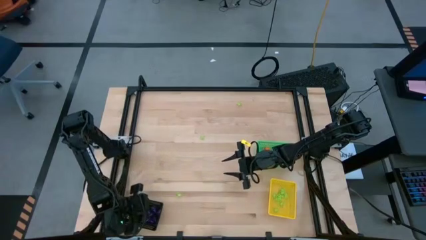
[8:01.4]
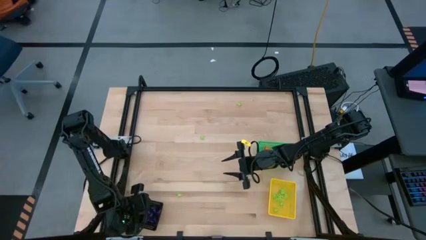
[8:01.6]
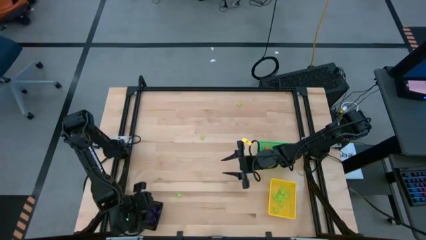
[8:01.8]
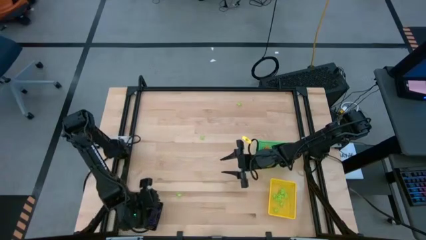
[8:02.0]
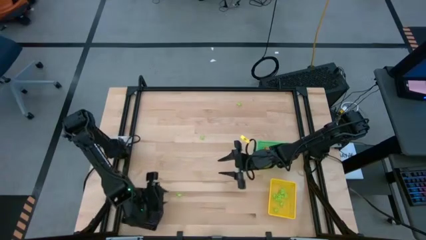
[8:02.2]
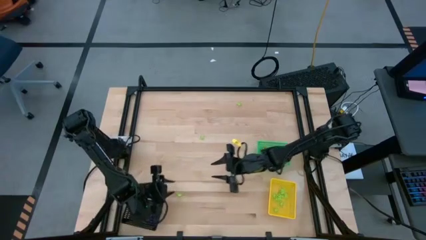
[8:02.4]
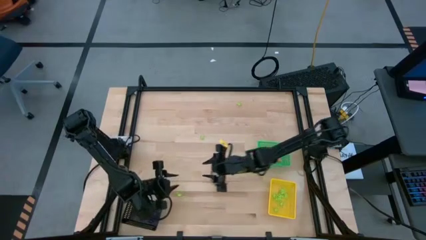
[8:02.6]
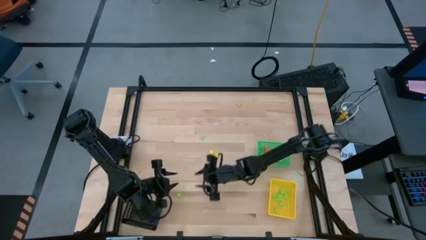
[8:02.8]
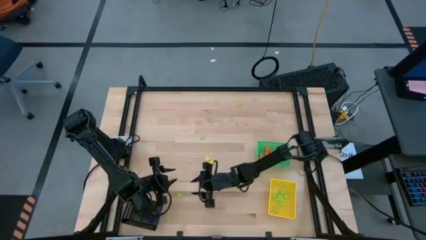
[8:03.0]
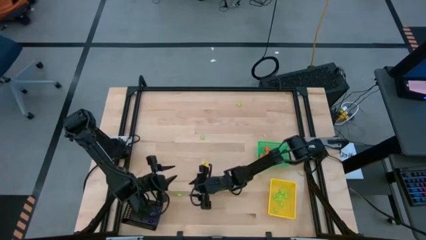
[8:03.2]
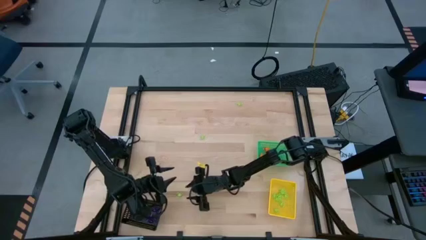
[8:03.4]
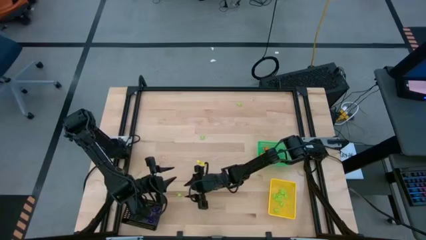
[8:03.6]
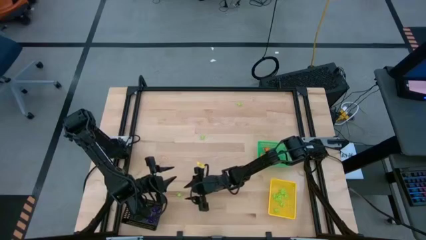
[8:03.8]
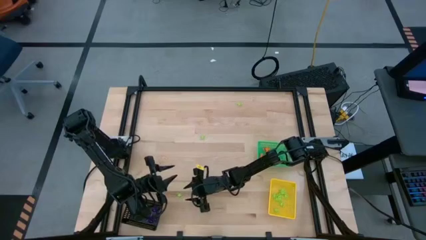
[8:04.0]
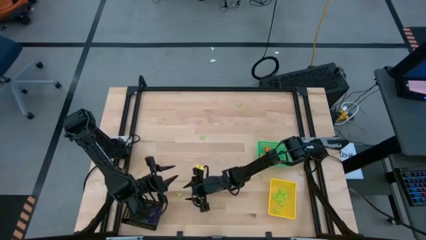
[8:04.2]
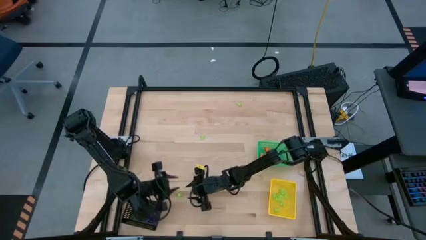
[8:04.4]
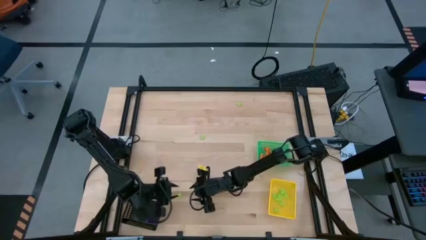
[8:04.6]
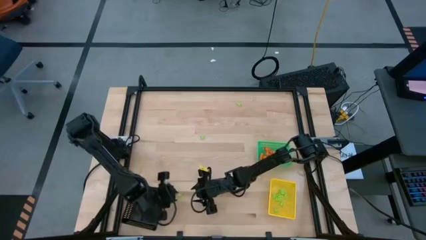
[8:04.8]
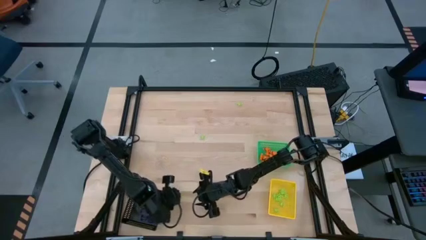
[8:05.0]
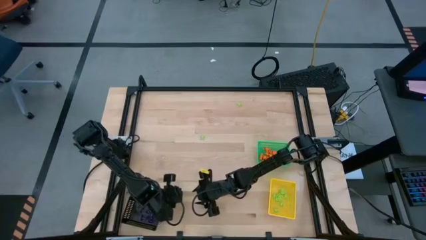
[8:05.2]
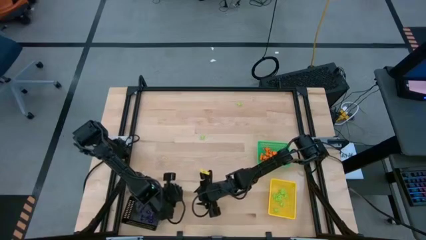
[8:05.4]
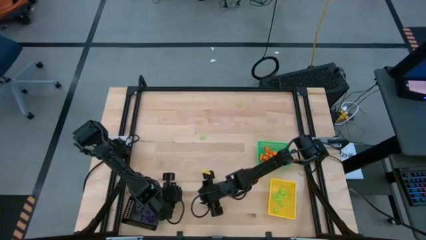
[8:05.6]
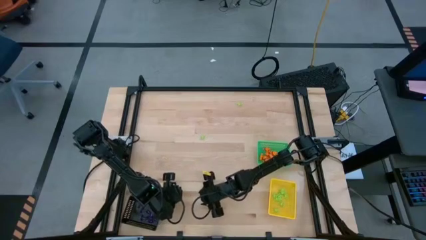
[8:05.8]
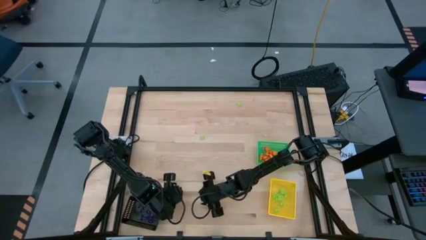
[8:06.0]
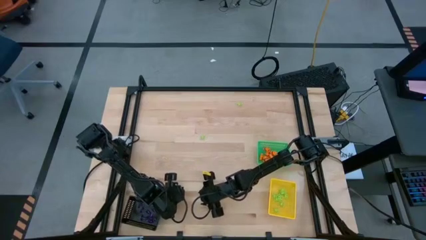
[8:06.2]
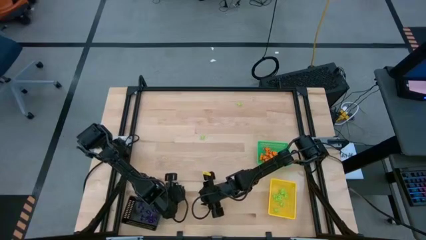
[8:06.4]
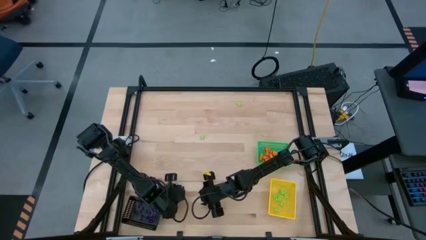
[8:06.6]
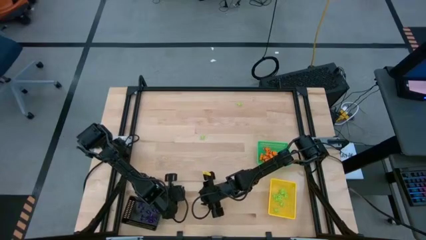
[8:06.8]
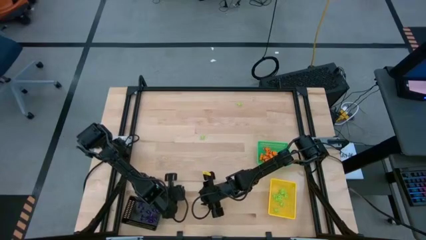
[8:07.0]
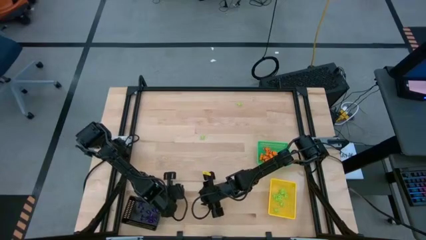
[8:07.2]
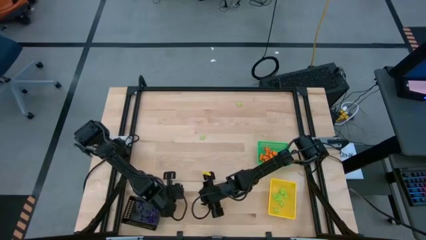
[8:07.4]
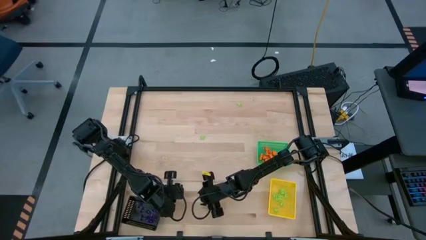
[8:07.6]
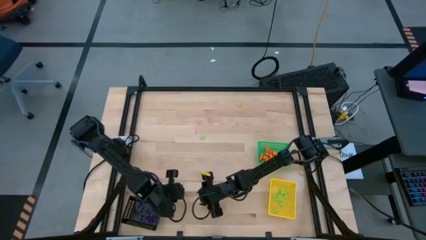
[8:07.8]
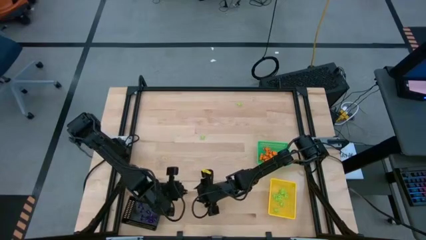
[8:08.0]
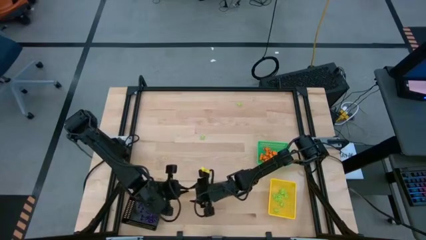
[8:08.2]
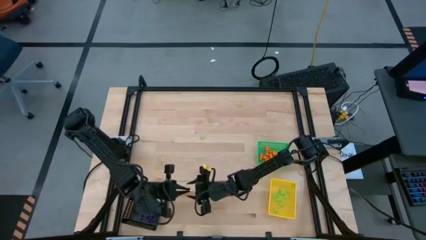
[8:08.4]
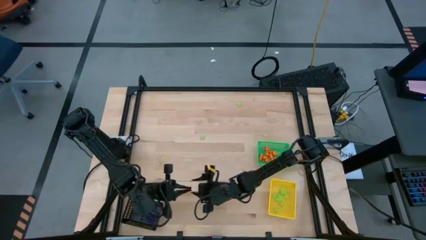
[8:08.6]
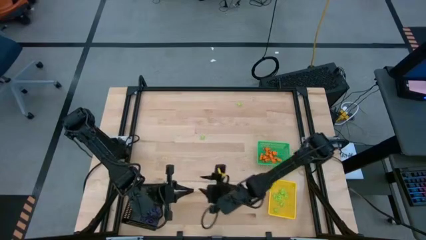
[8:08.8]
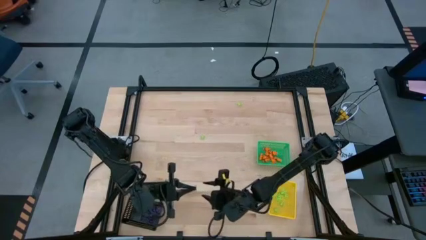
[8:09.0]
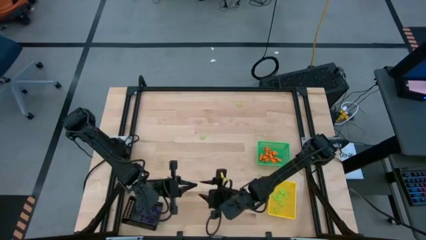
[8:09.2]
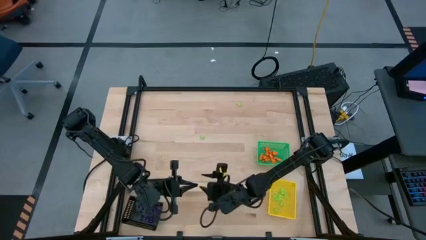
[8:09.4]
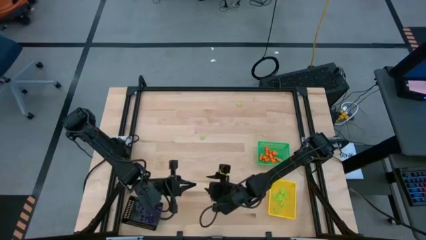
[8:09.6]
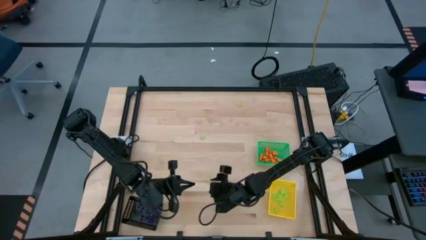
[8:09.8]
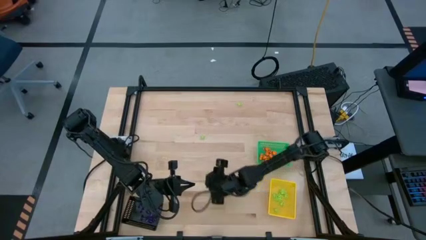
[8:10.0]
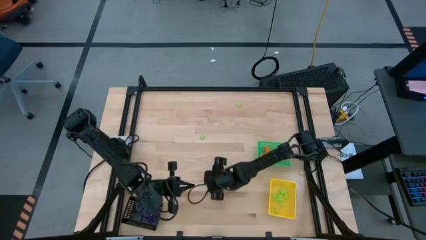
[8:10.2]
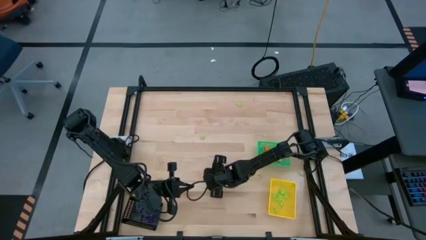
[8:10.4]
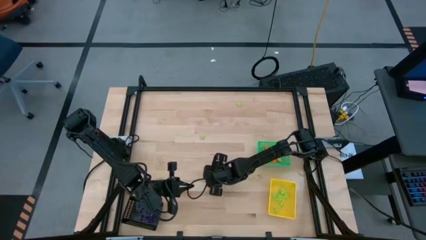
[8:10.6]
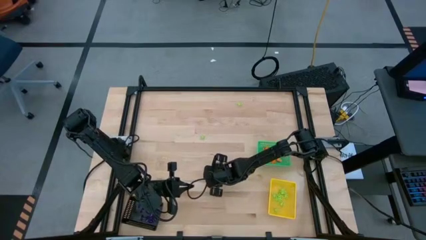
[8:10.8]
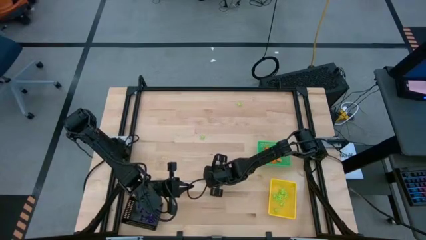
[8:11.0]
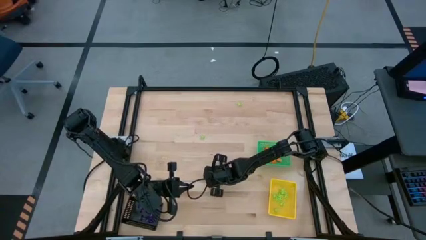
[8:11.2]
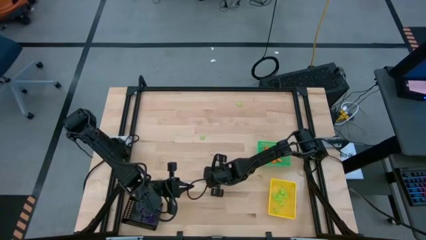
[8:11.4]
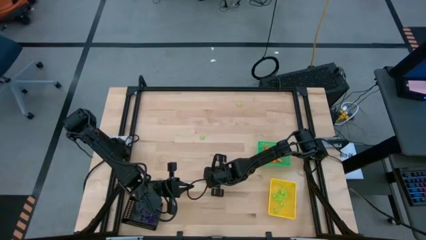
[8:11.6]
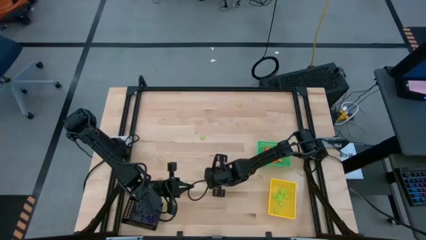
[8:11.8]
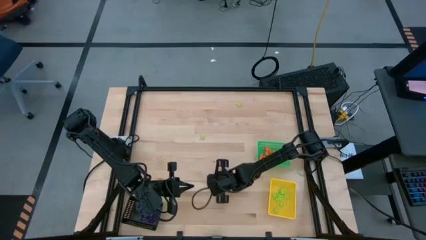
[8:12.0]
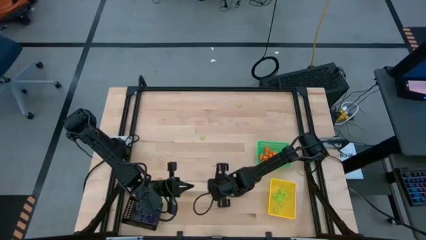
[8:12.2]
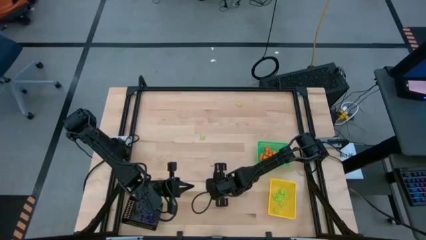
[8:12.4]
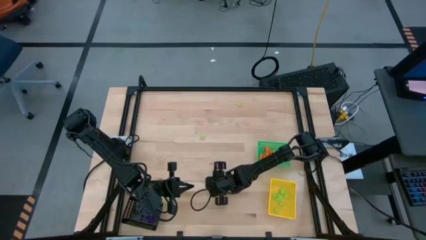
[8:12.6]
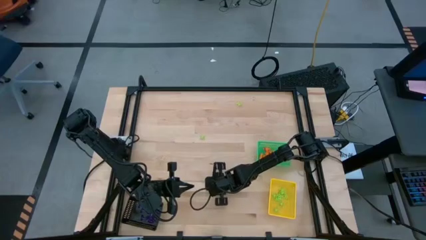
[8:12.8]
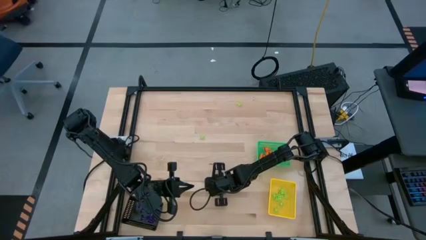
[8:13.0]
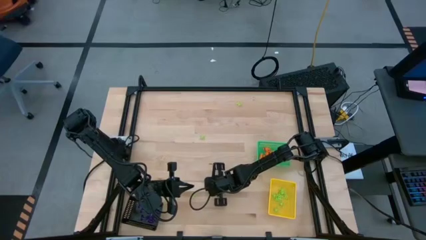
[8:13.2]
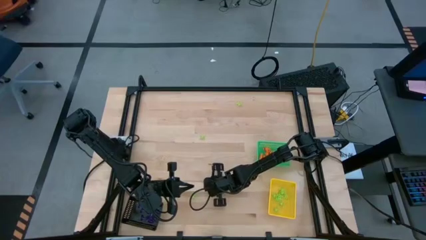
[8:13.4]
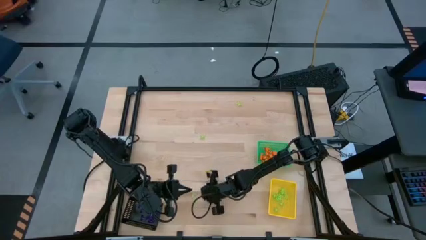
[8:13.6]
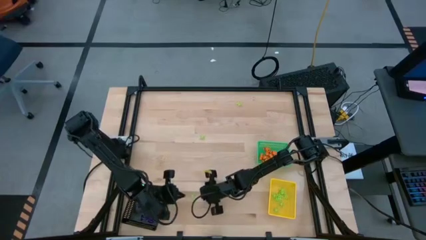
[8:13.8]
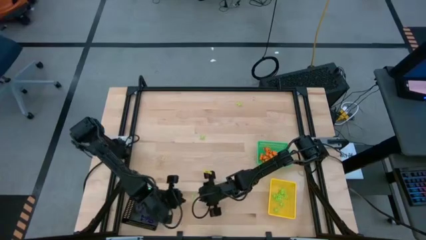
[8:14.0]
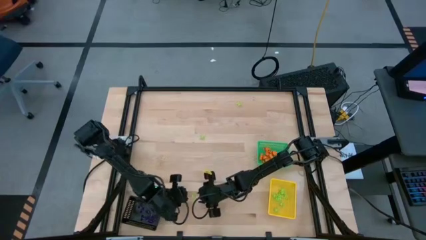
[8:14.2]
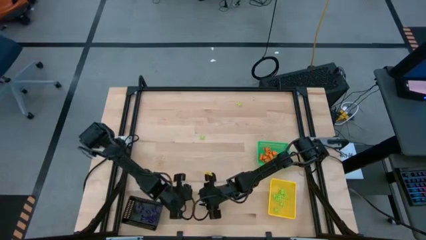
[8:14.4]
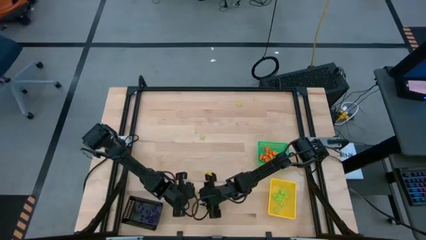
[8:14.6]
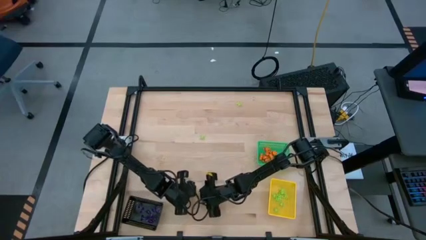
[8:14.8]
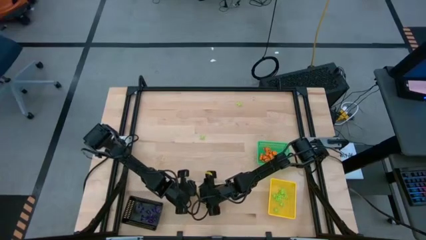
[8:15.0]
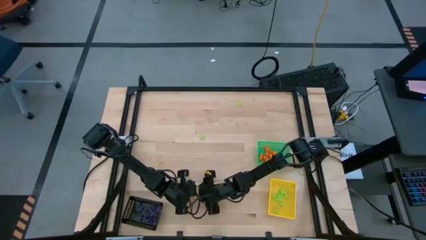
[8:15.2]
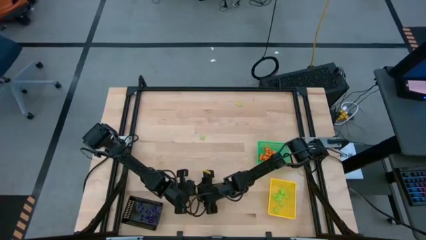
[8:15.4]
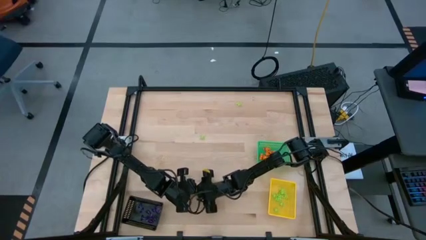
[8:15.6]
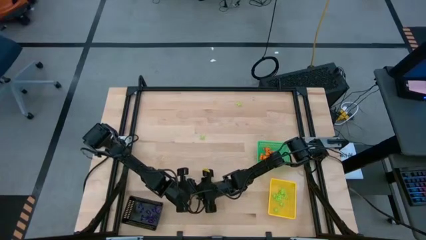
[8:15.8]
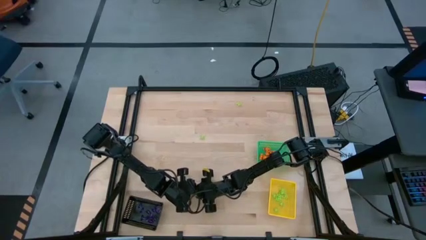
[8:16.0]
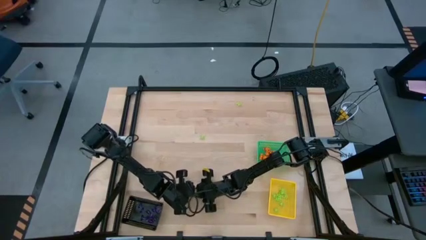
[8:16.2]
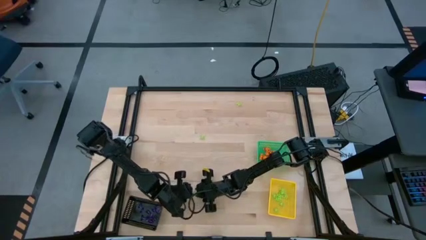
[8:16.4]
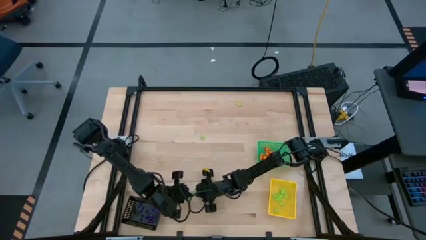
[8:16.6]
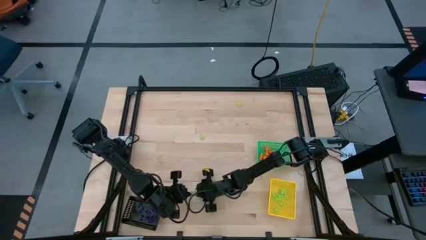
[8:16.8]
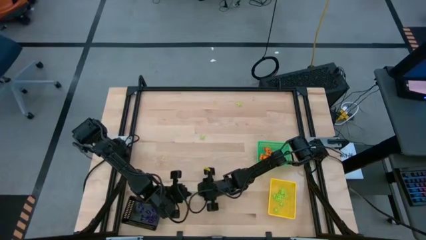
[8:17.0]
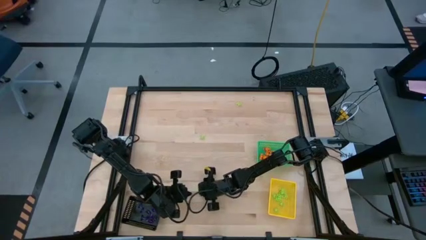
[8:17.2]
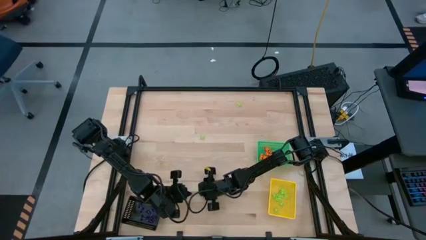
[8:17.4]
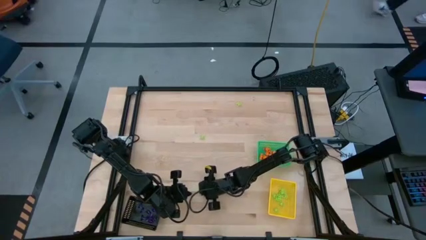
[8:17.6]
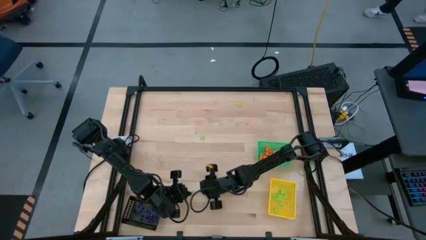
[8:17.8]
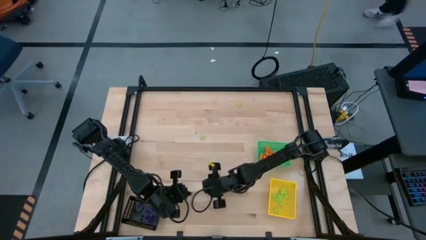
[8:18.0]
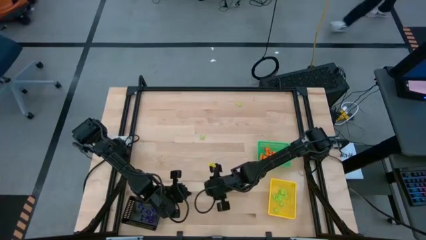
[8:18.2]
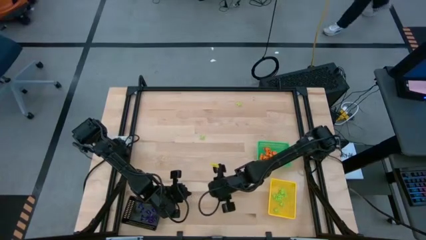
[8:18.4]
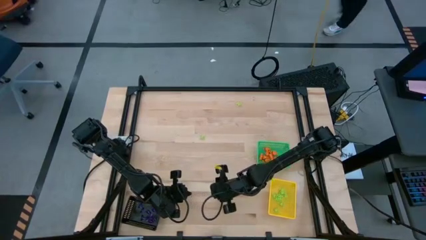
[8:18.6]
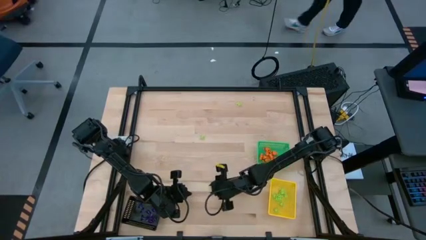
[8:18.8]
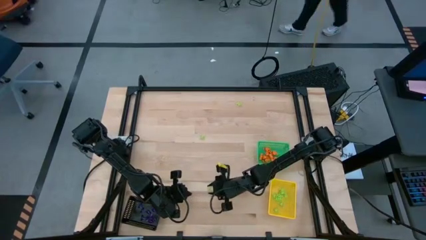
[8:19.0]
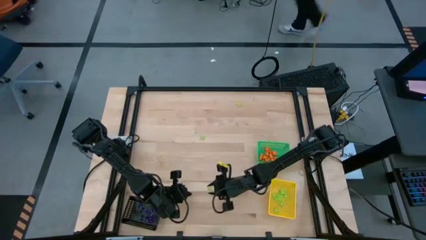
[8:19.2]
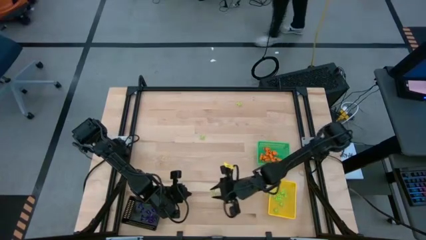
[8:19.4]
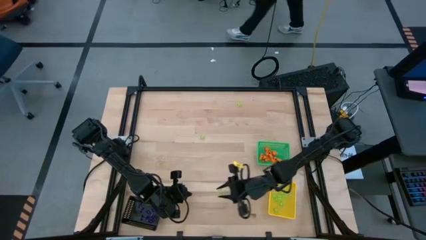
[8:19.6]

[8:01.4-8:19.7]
Task: Sort Halloween decoration
Put the green spider toy into the yellow bin
